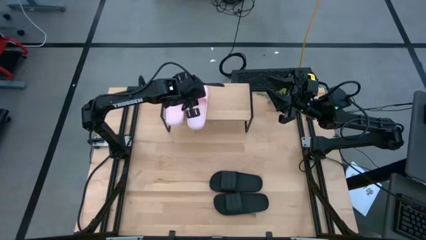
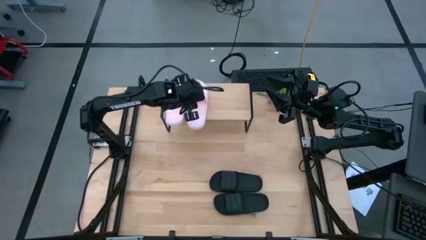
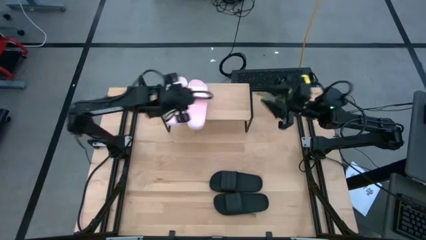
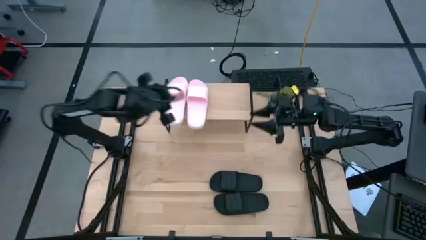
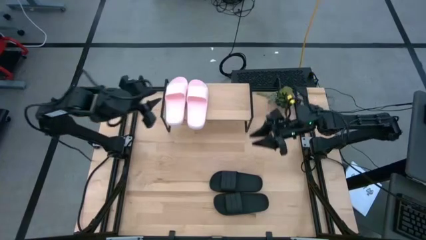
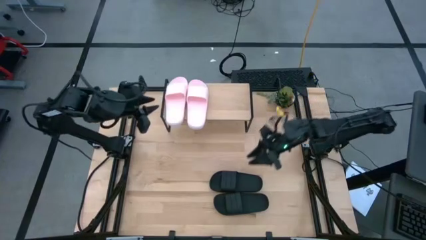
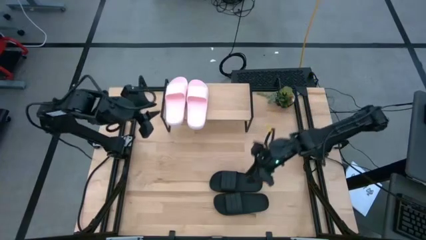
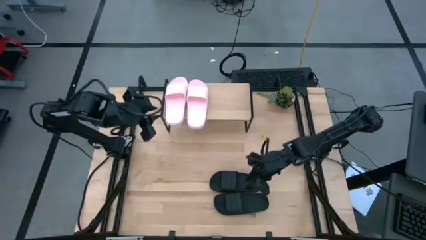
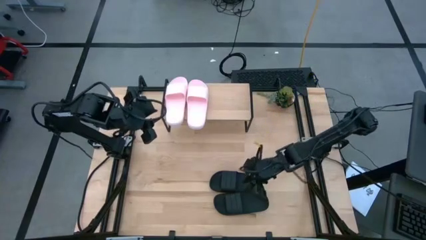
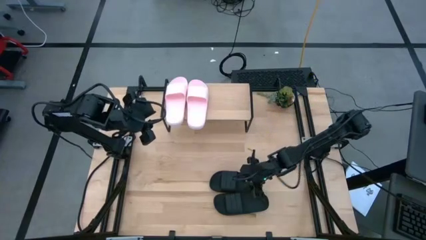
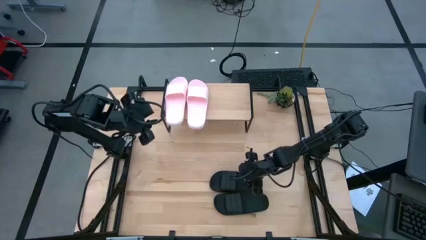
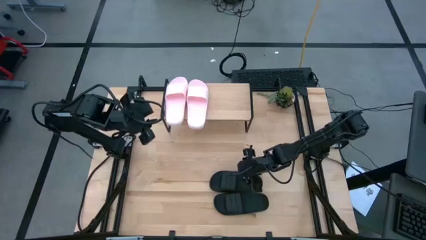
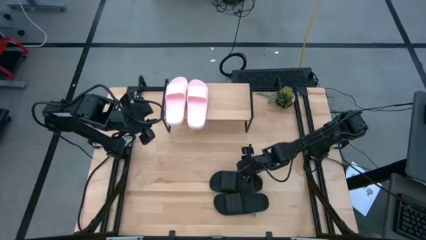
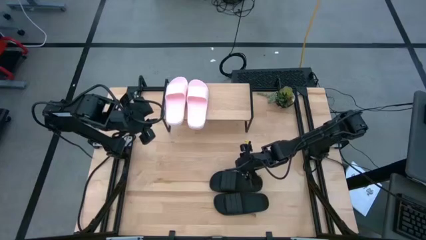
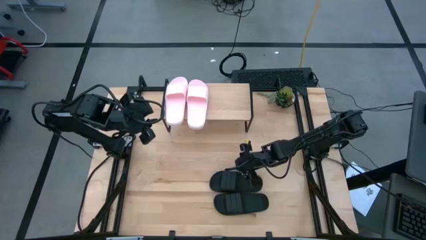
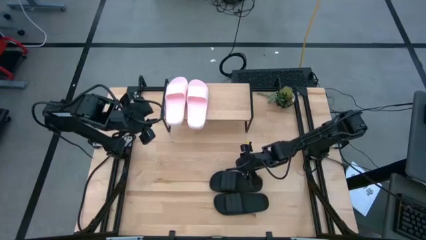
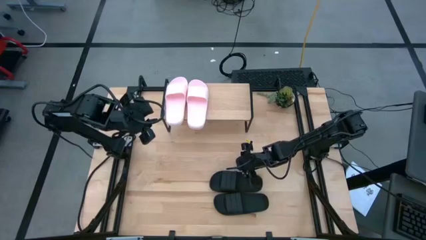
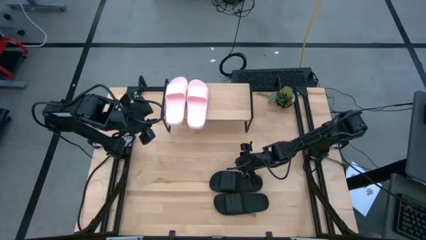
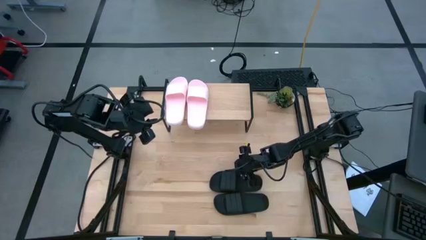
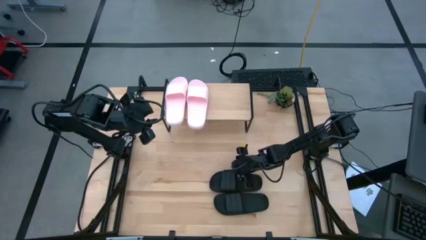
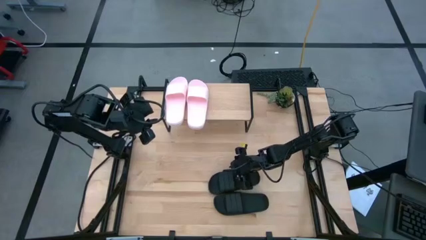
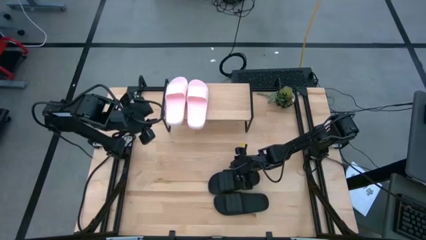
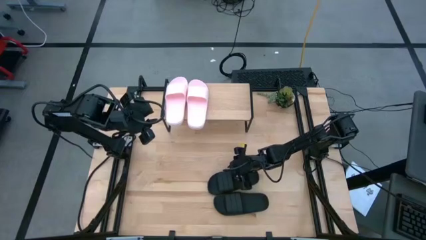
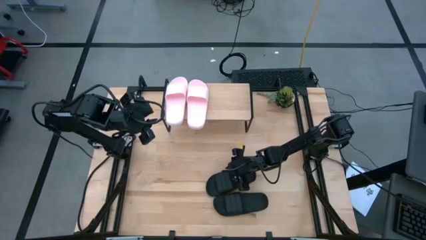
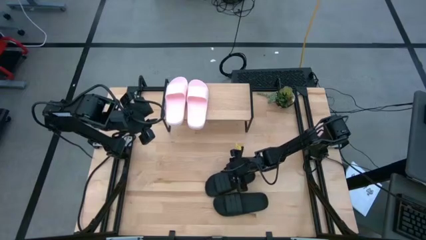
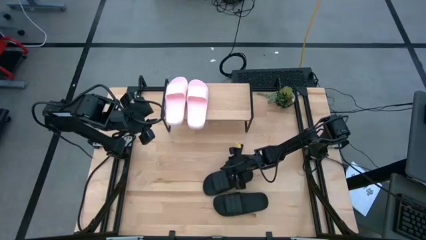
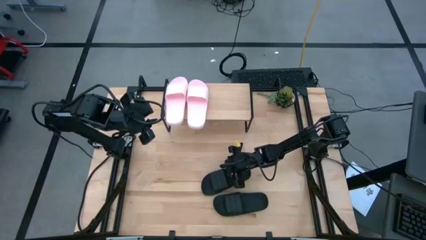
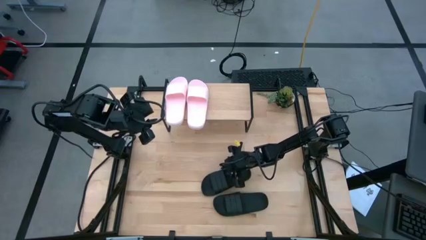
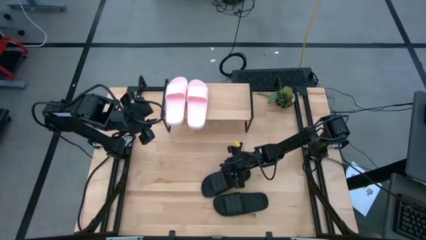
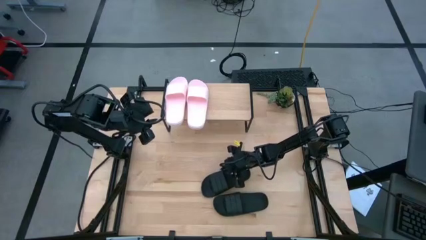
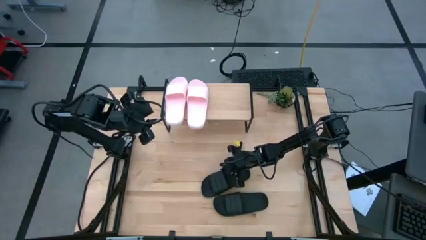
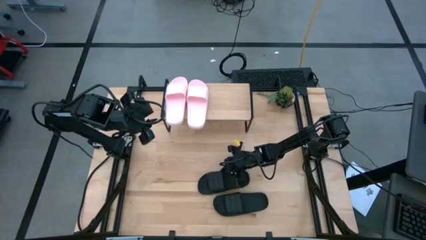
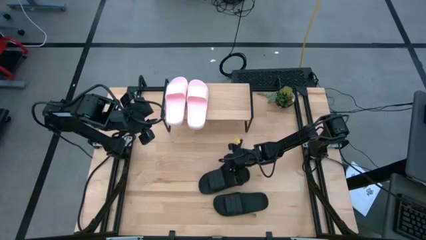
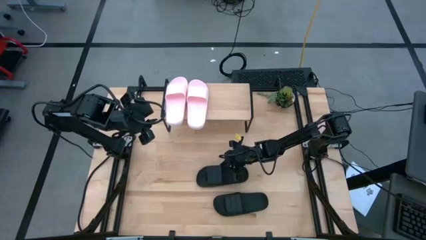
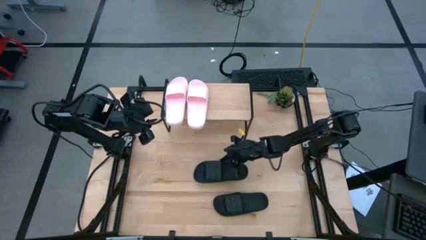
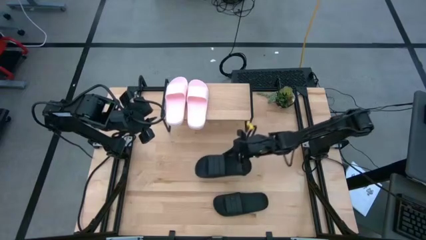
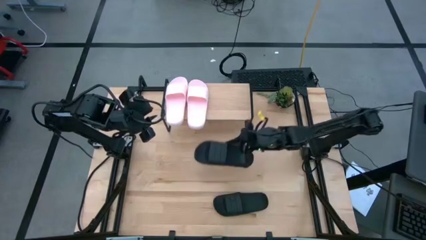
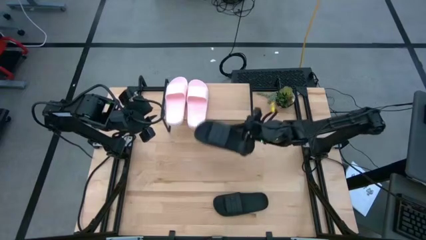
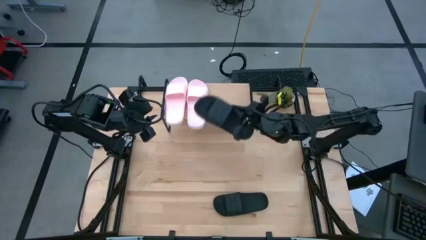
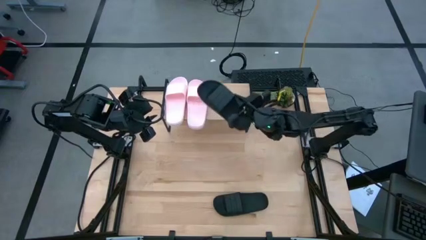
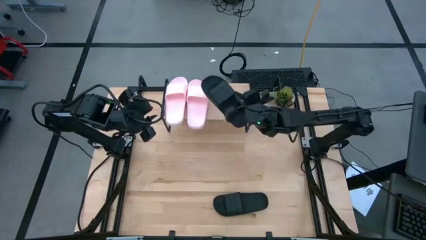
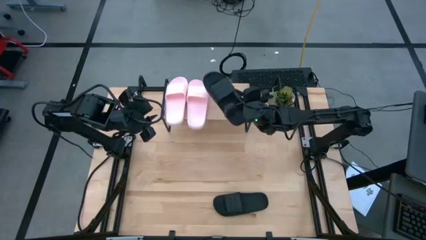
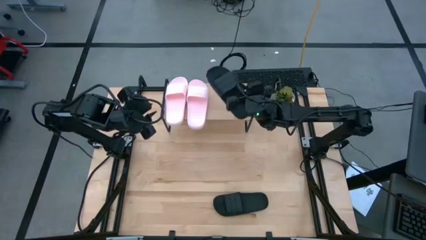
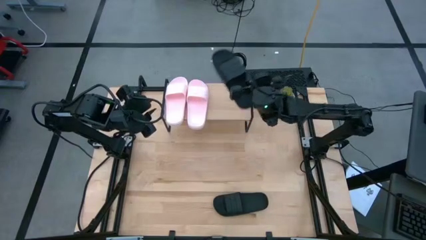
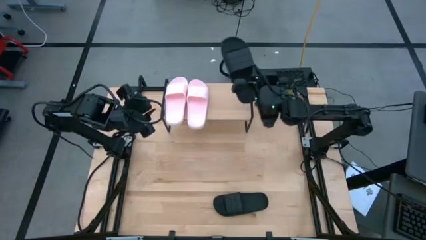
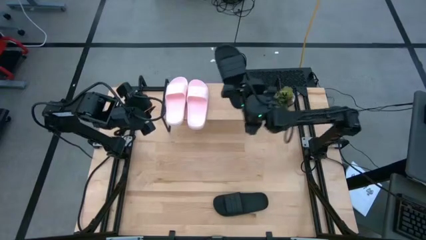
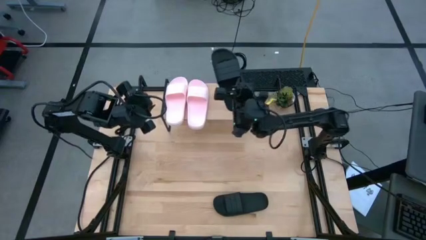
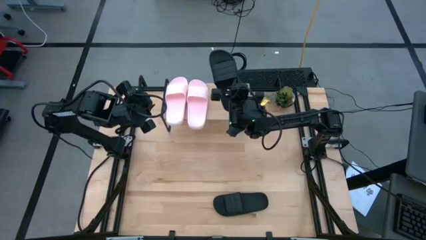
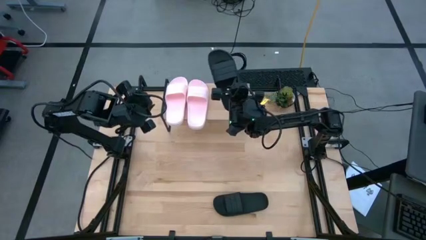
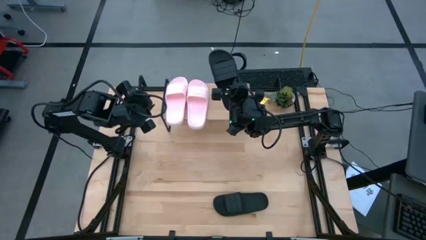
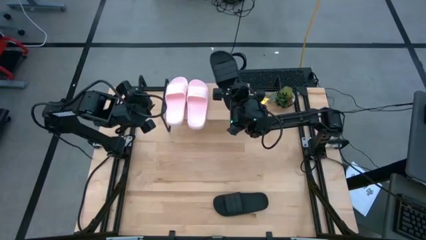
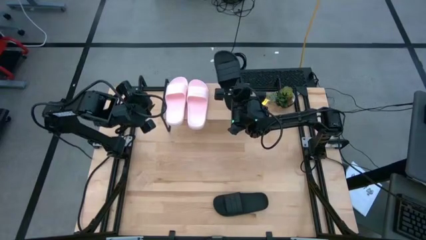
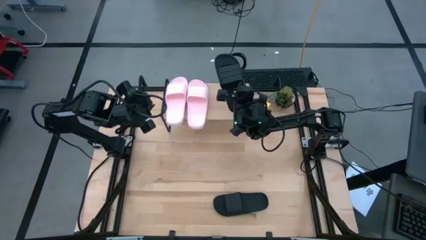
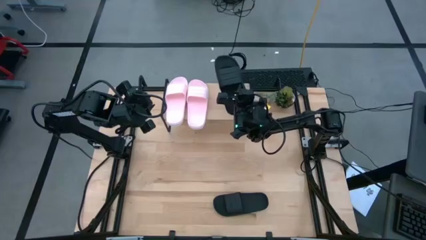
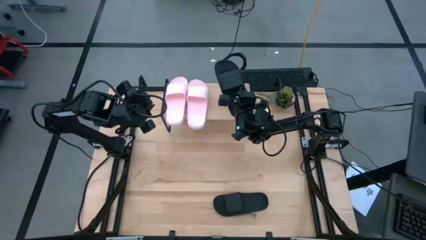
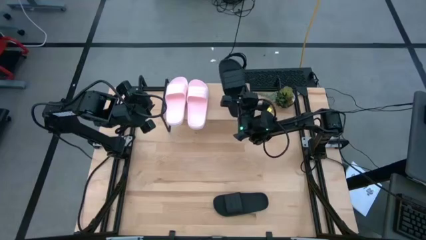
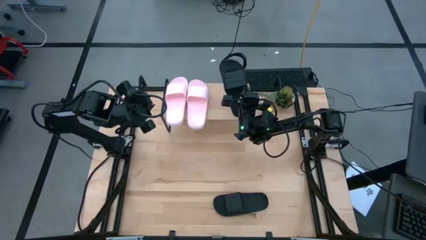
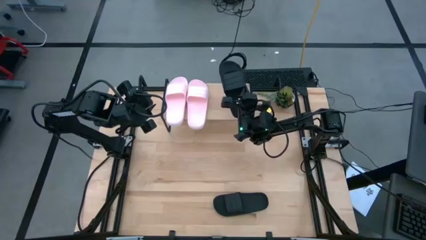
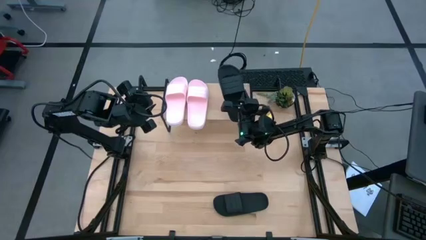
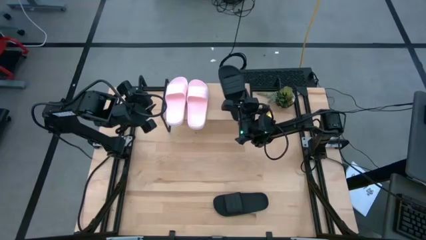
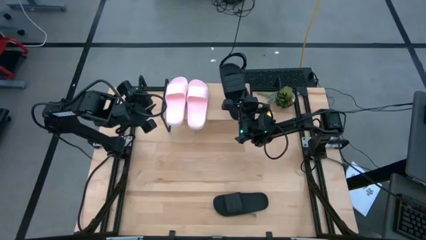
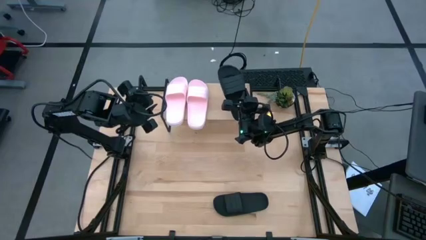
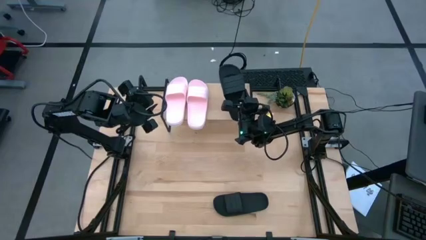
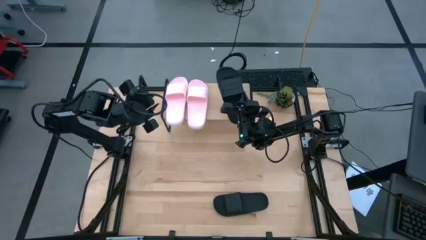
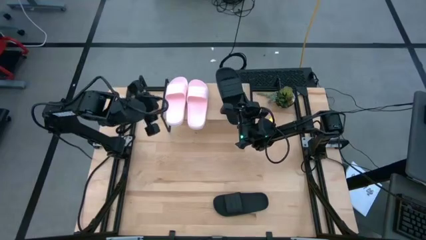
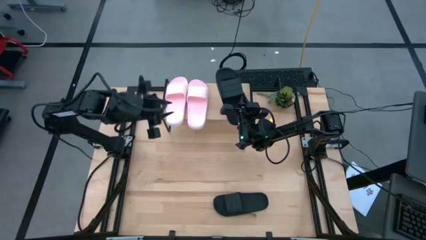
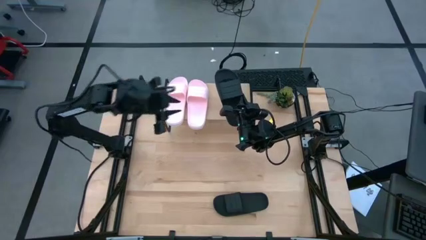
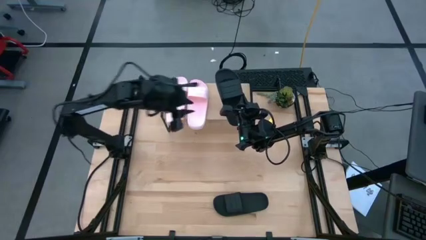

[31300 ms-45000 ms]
Task: Pick and place slides into the shelf
Put the top black slipper on the shelf

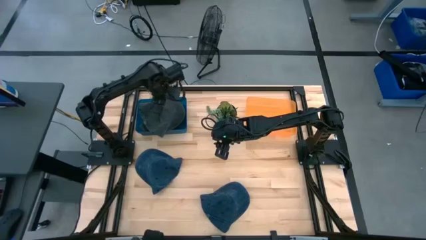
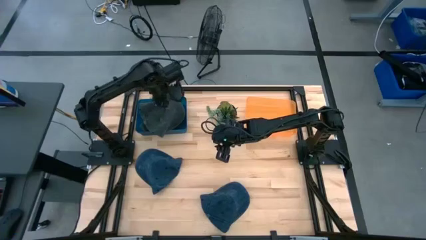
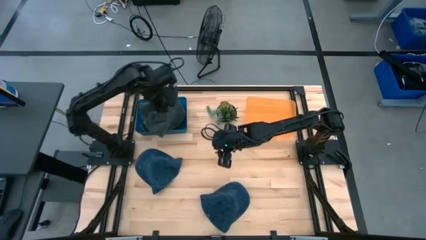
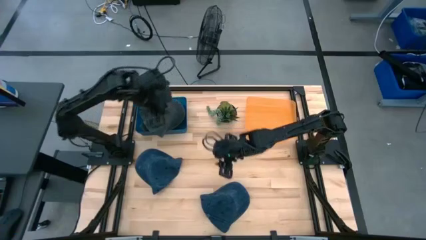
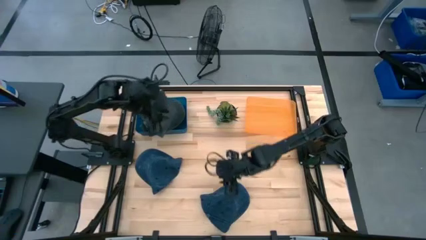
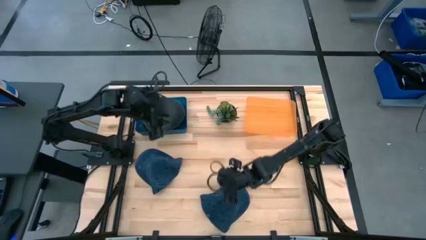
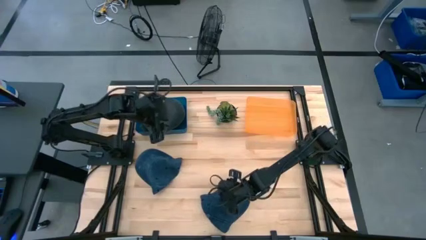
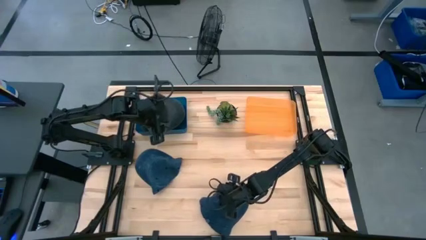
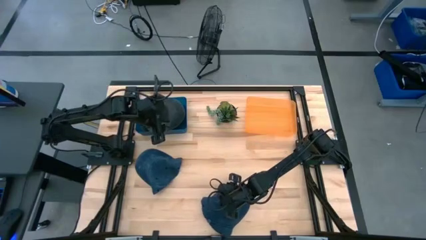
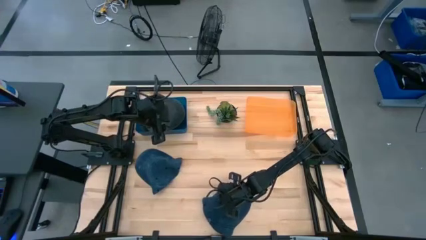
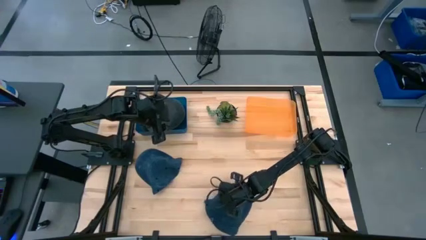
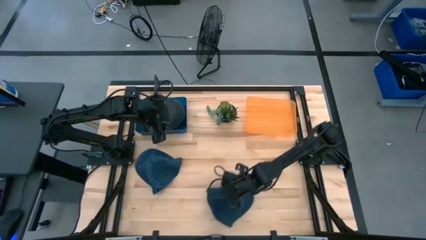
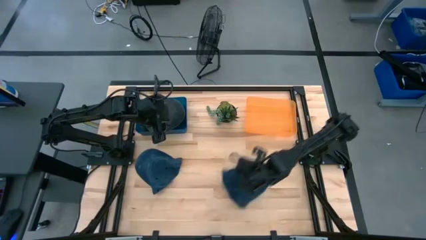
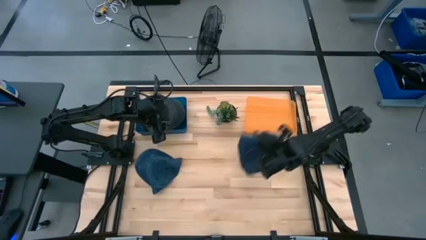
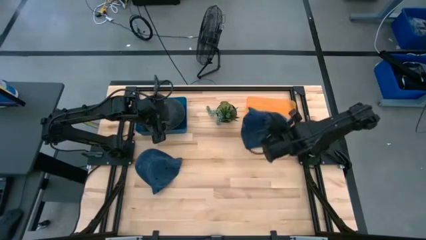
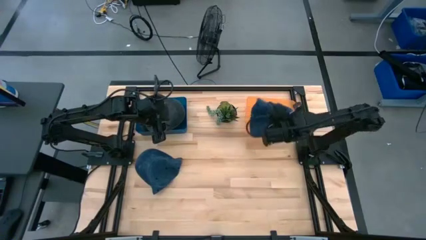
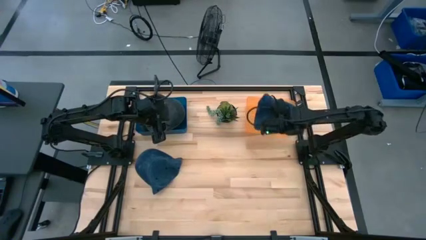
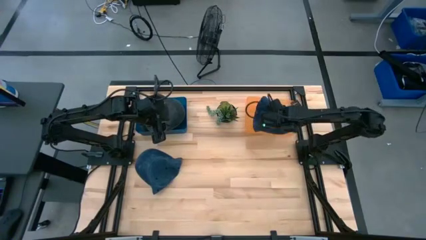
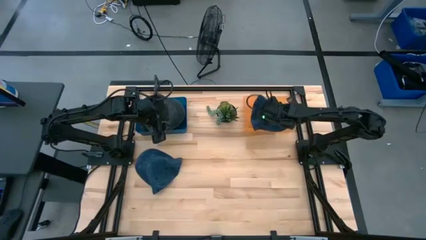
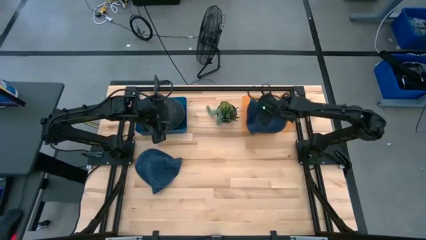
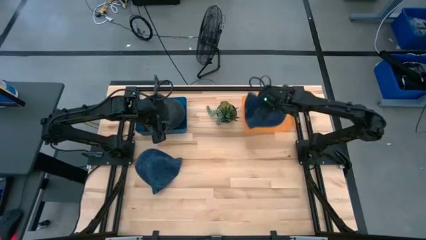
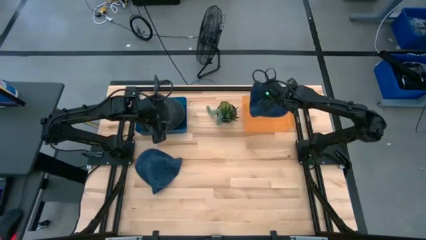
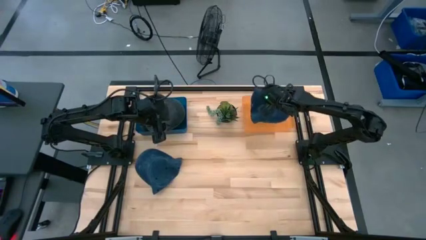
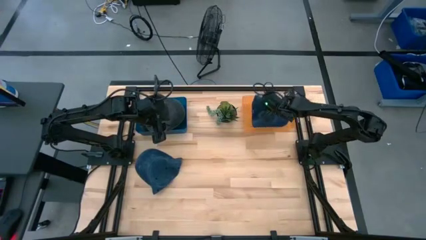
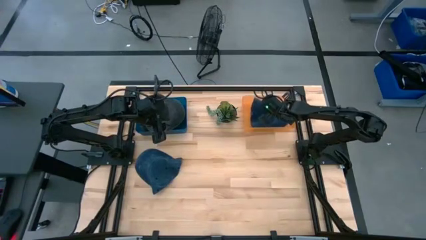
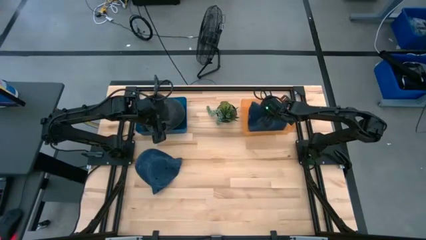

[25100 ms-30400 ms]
Task: Pick & Place hat
Put the right blue cap into the orange bin
